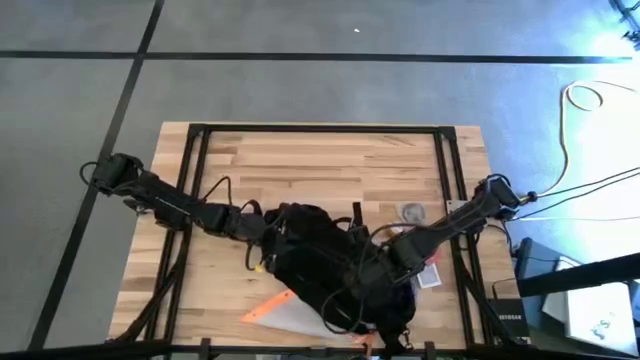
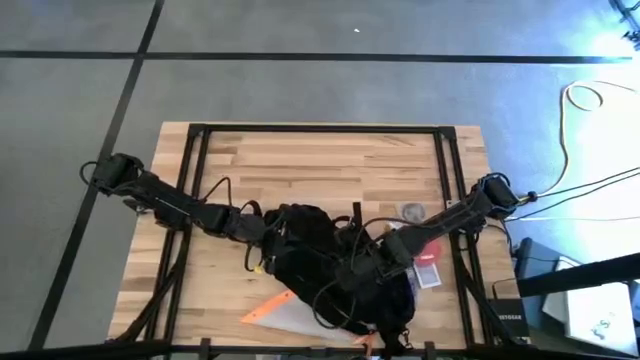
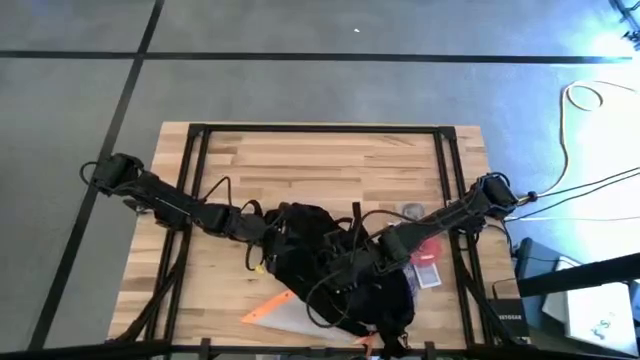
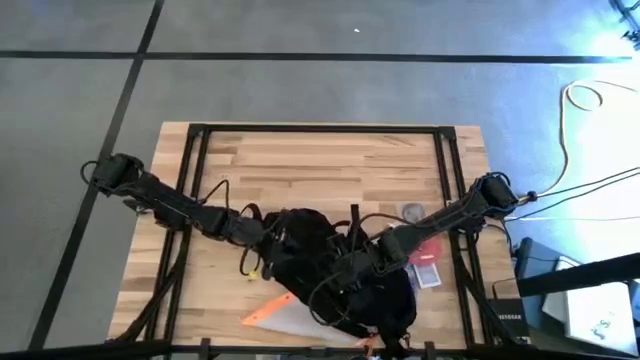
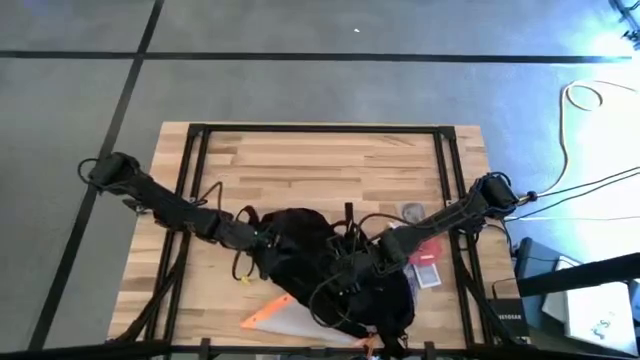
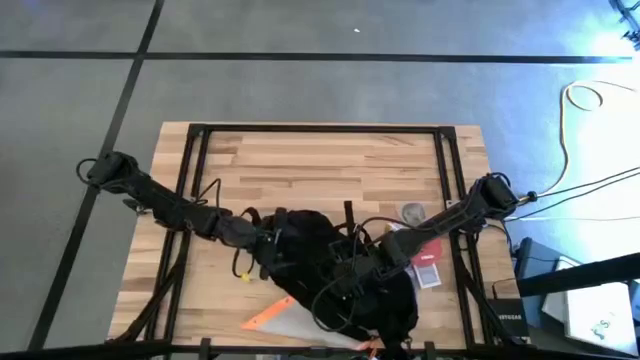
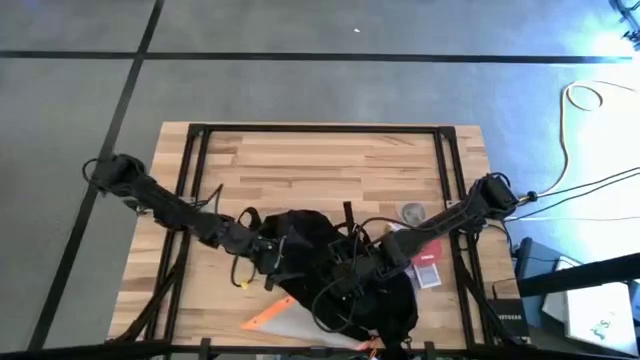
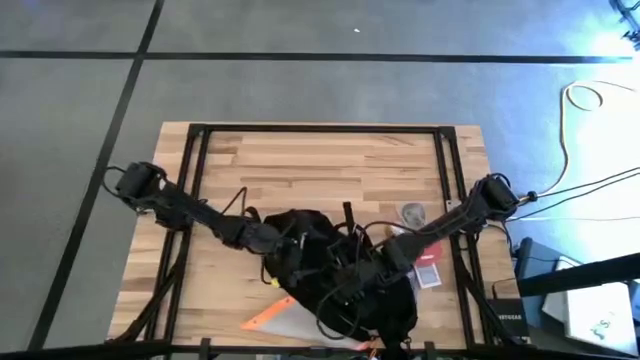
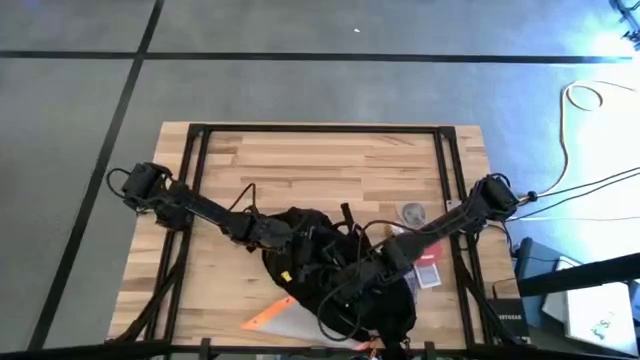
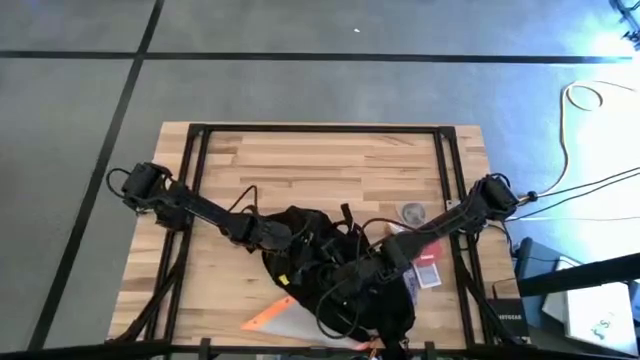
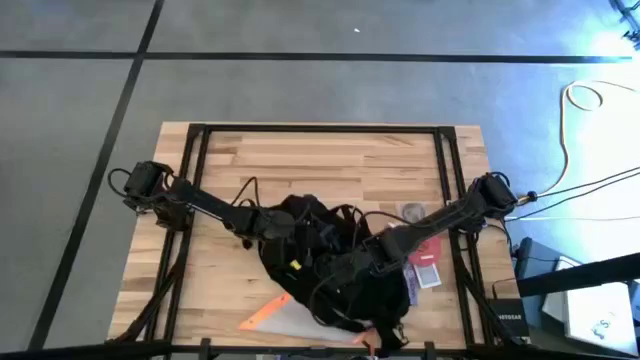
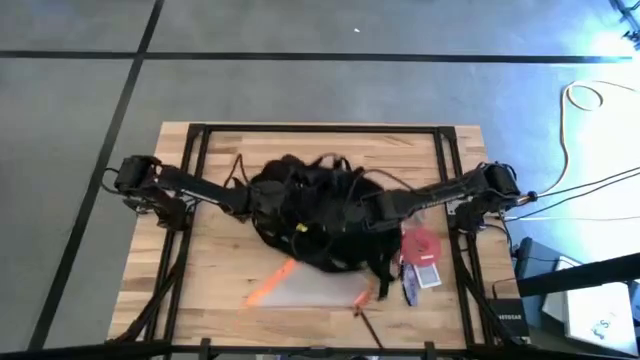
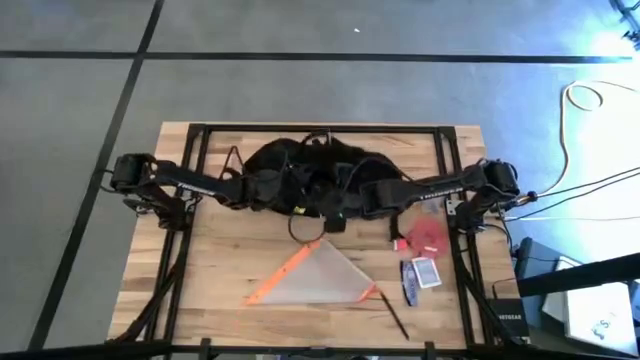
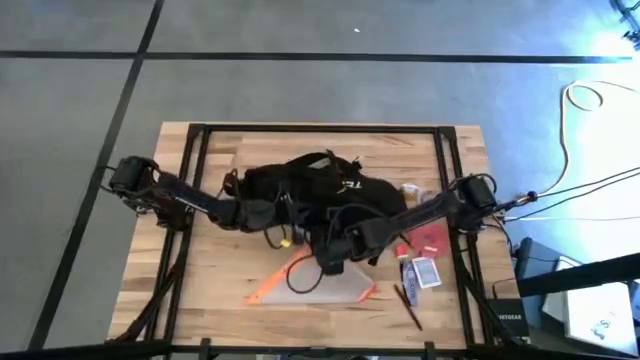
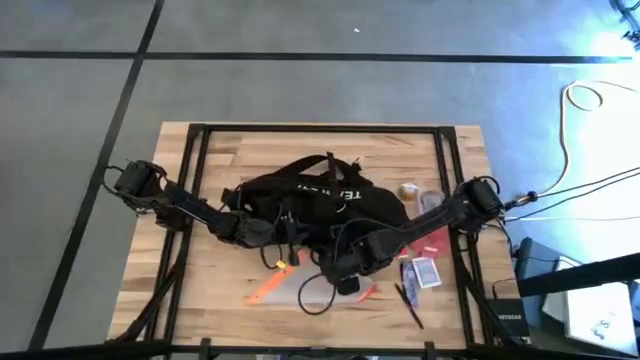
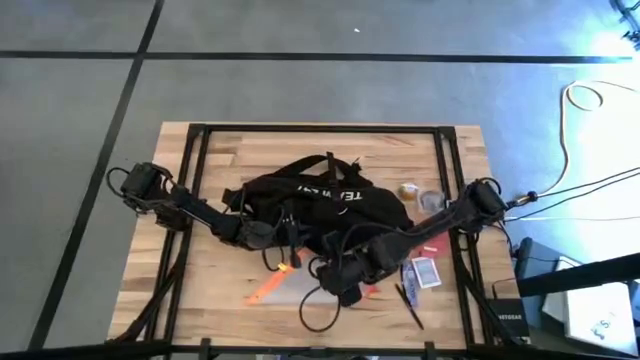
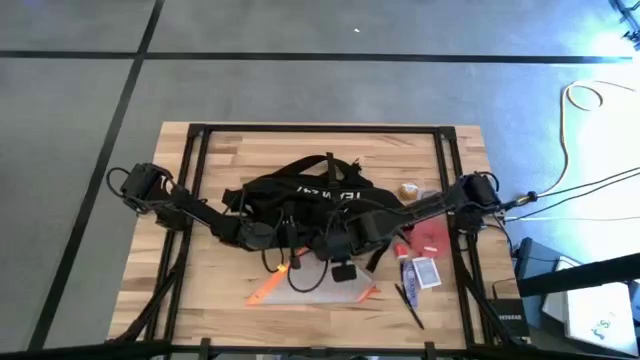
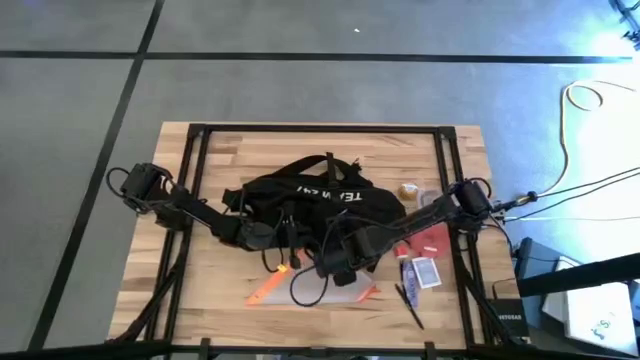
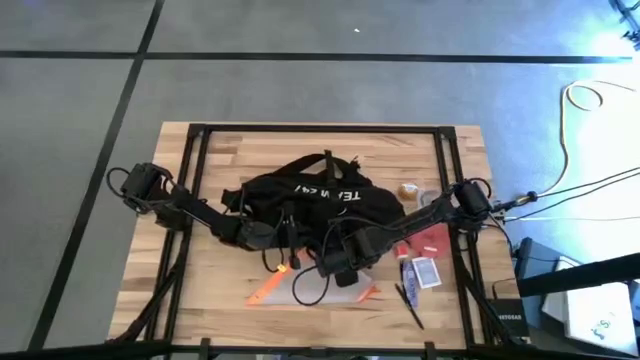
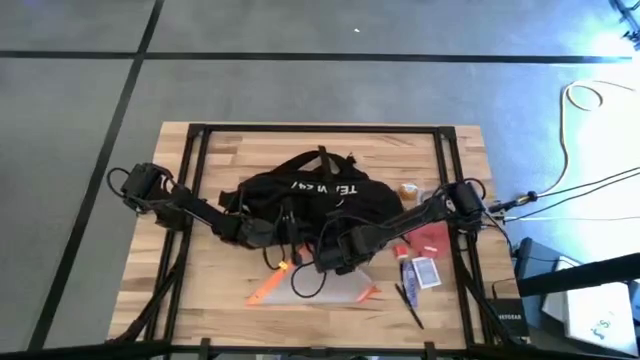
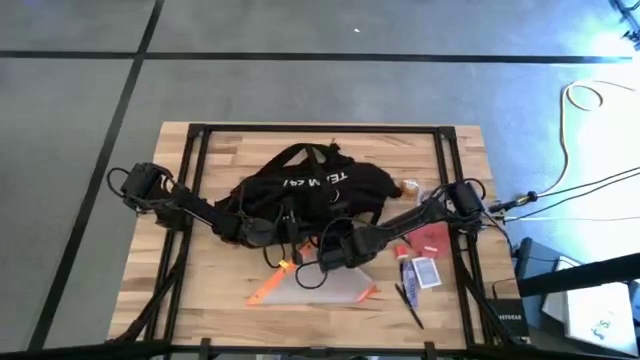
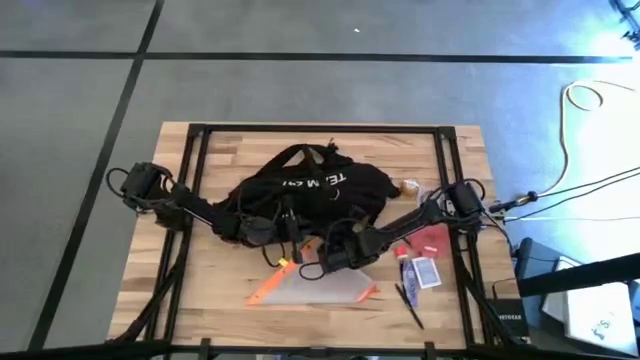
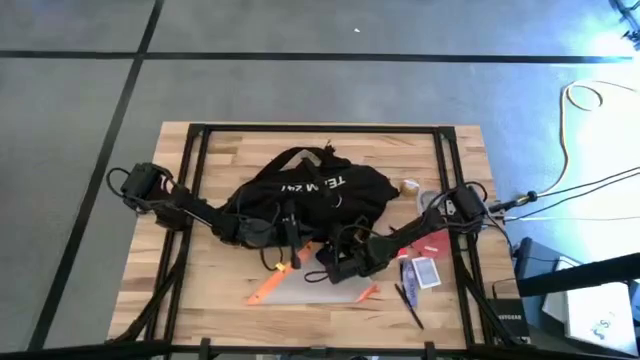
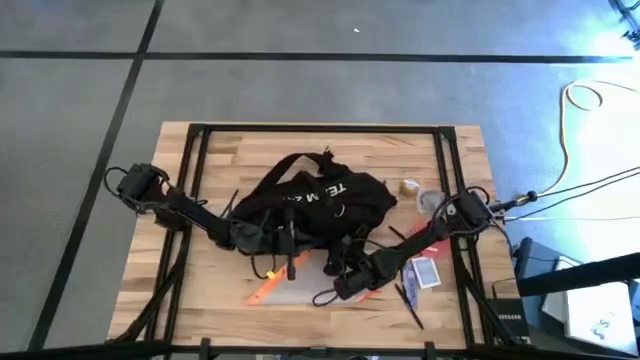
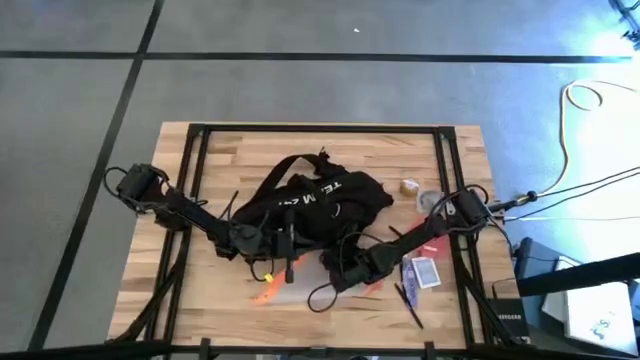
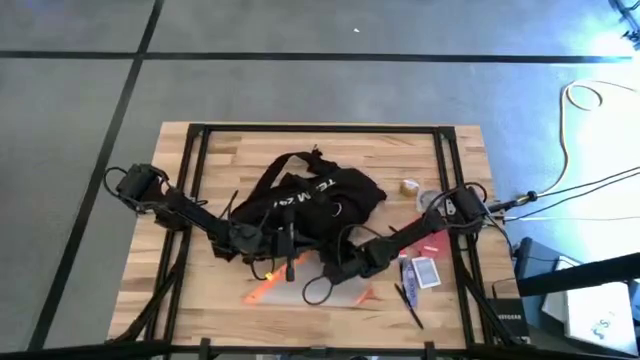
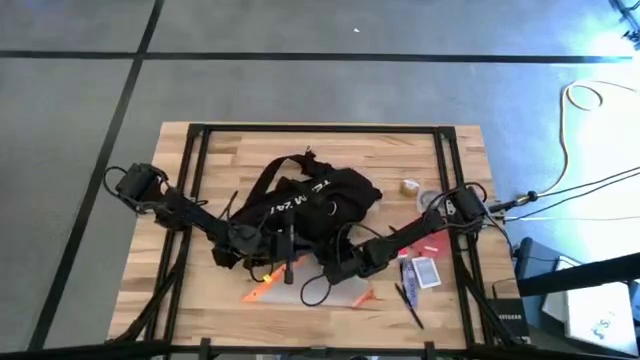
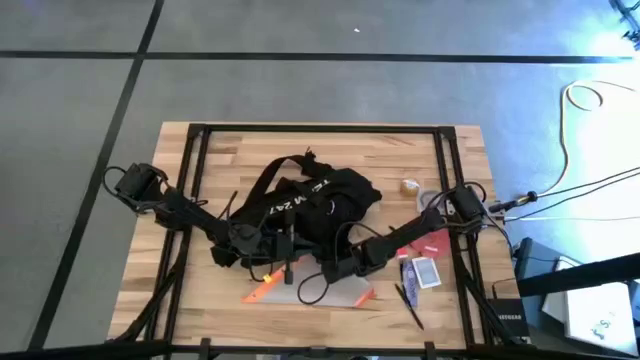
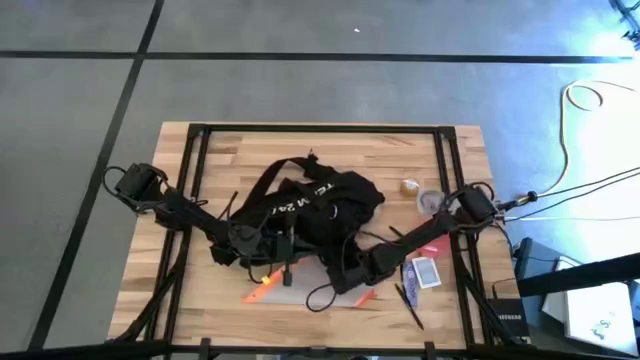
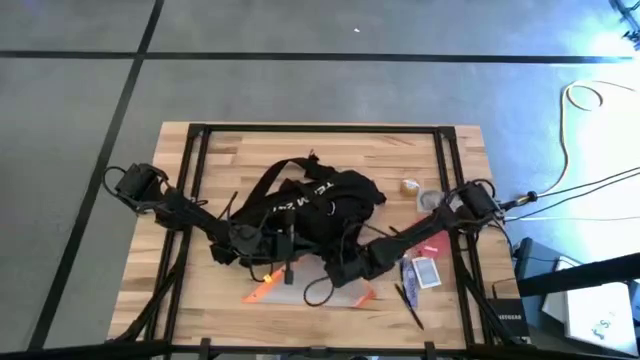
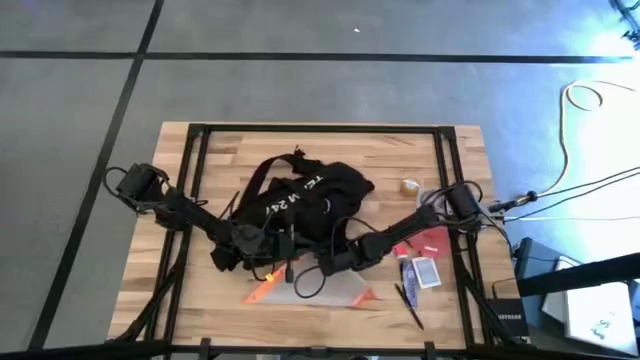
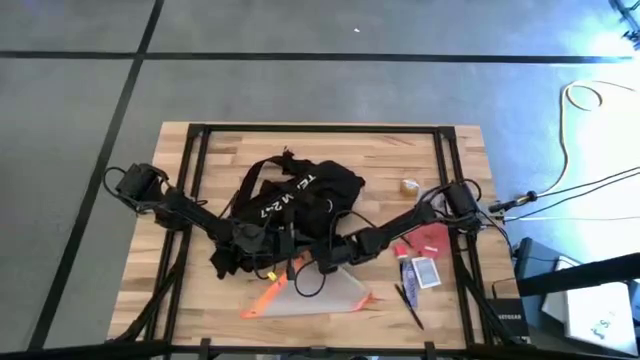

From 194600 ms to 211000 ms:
Task: Unpack backpack
Remove the white charger cable from the black bag
